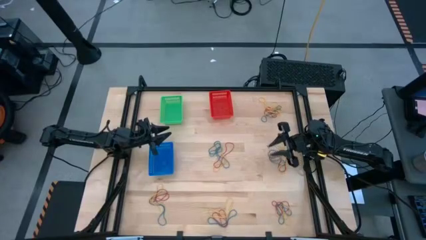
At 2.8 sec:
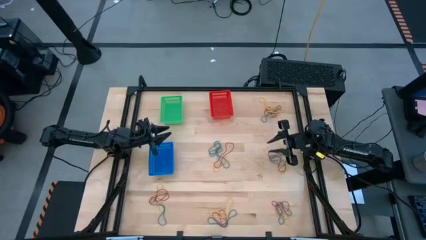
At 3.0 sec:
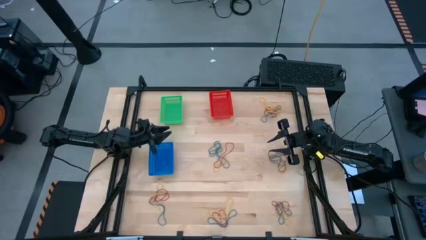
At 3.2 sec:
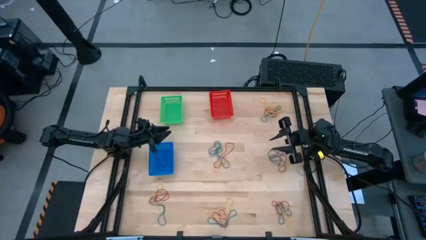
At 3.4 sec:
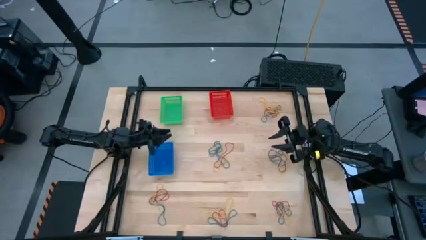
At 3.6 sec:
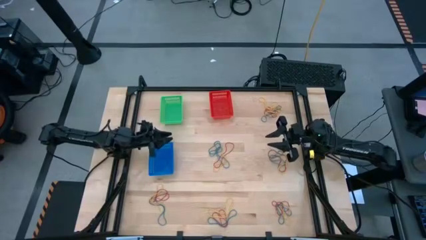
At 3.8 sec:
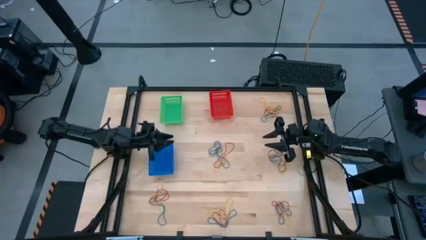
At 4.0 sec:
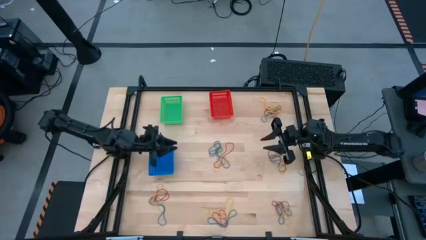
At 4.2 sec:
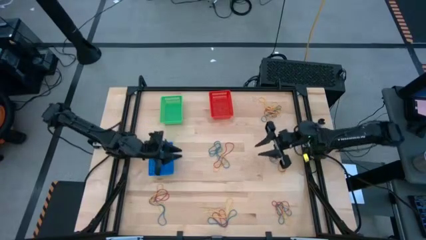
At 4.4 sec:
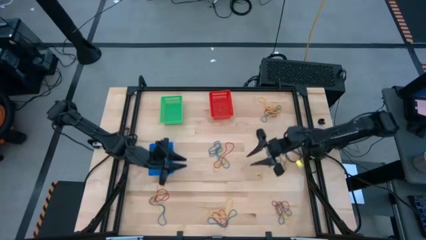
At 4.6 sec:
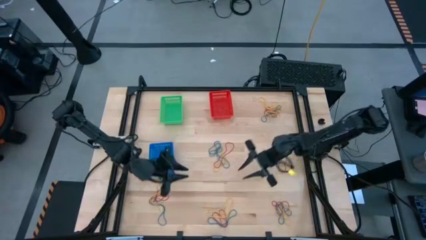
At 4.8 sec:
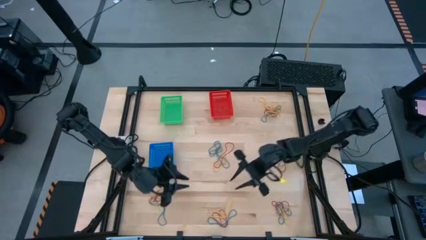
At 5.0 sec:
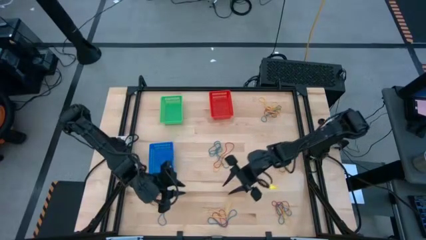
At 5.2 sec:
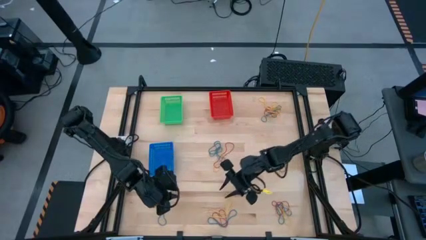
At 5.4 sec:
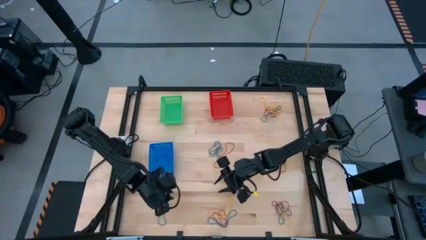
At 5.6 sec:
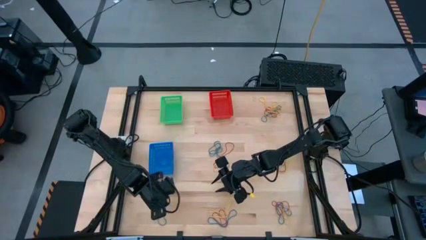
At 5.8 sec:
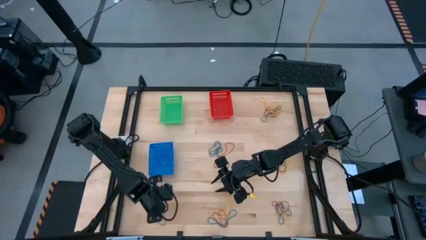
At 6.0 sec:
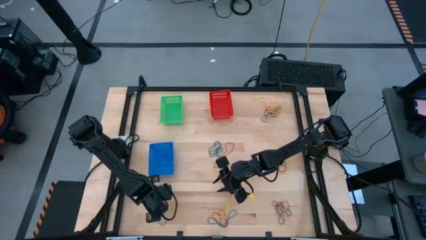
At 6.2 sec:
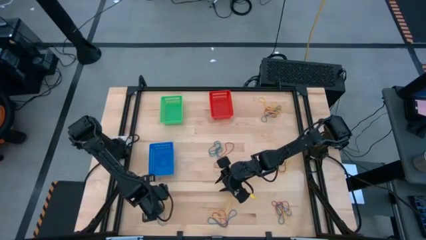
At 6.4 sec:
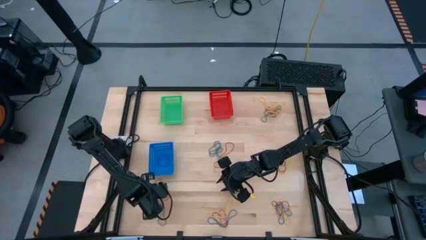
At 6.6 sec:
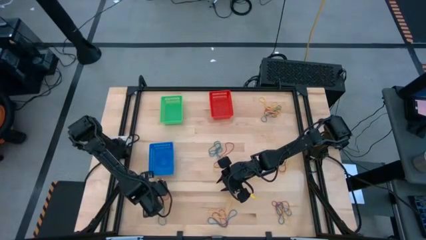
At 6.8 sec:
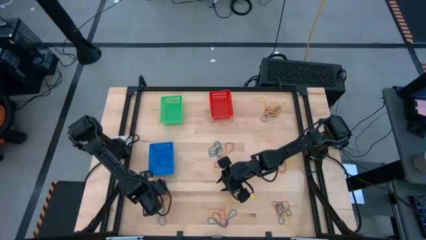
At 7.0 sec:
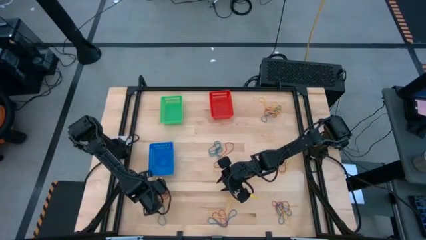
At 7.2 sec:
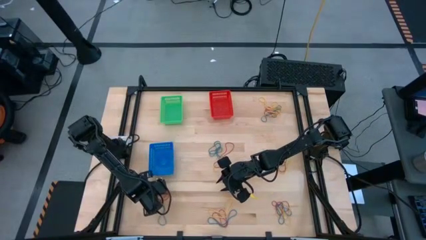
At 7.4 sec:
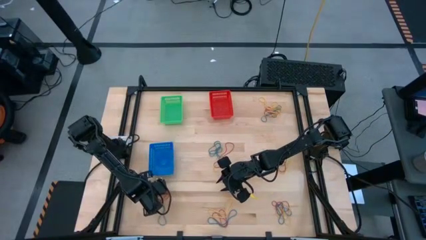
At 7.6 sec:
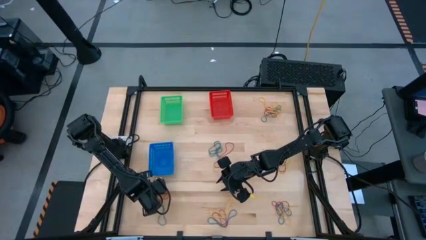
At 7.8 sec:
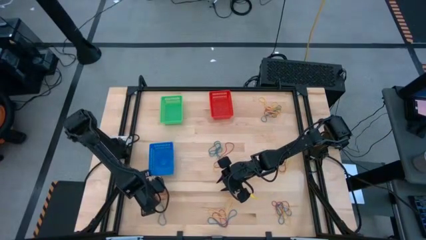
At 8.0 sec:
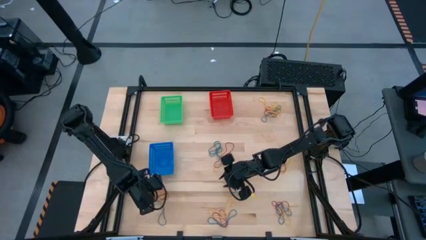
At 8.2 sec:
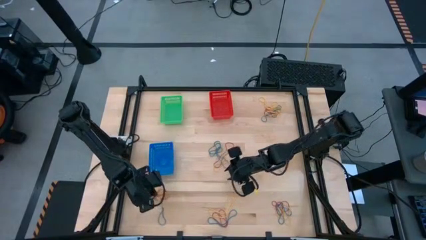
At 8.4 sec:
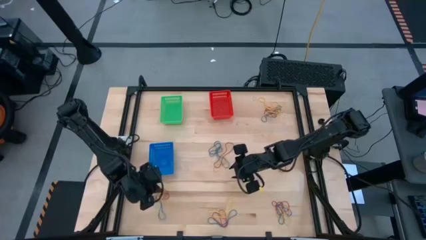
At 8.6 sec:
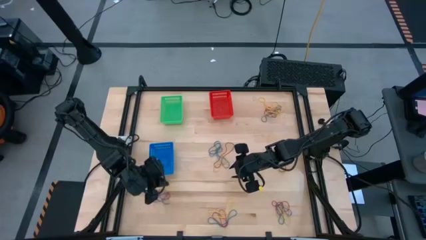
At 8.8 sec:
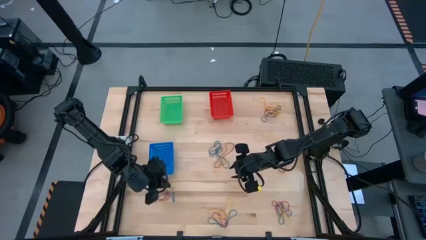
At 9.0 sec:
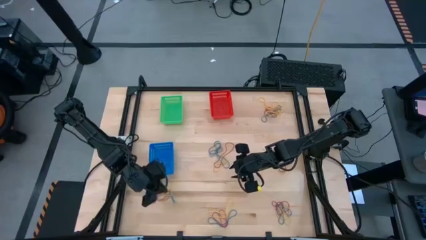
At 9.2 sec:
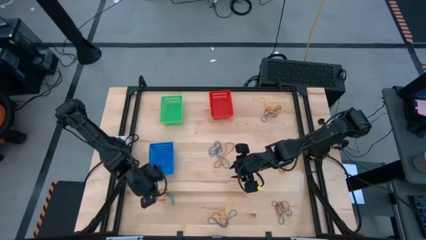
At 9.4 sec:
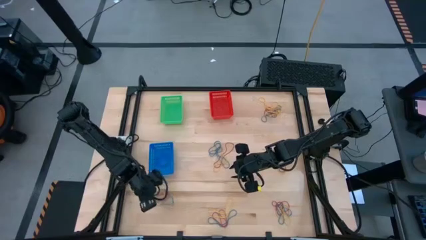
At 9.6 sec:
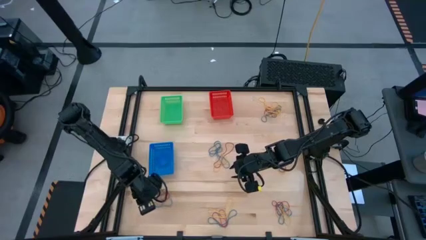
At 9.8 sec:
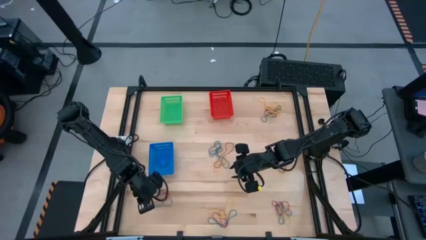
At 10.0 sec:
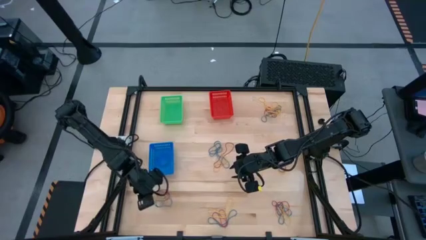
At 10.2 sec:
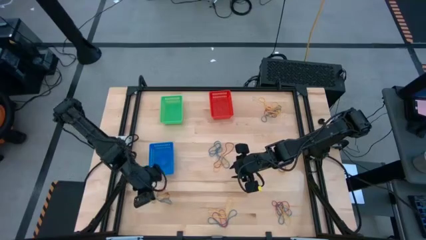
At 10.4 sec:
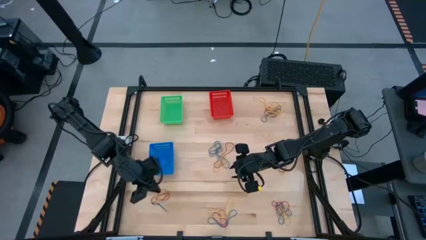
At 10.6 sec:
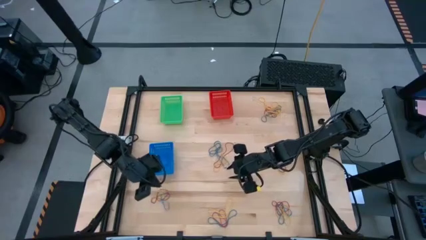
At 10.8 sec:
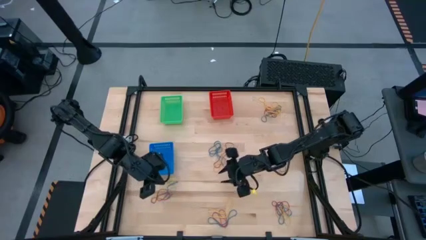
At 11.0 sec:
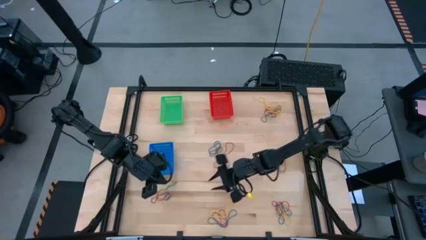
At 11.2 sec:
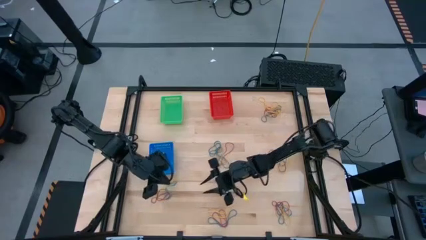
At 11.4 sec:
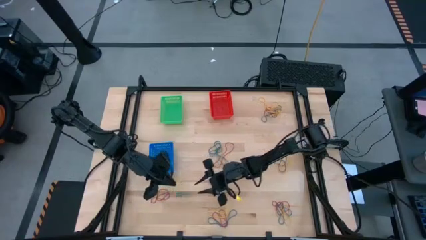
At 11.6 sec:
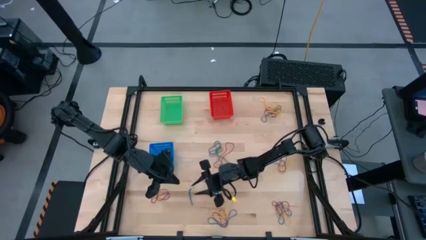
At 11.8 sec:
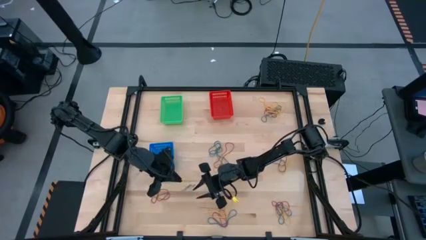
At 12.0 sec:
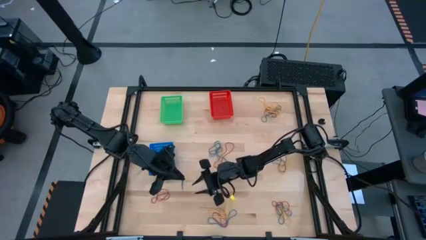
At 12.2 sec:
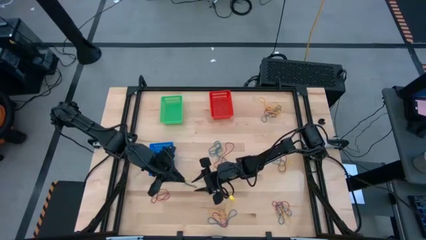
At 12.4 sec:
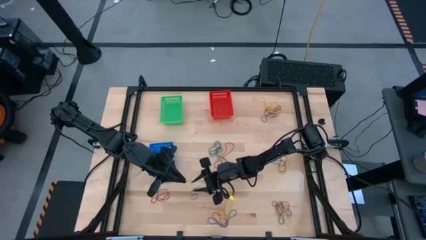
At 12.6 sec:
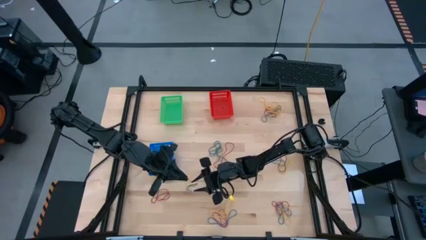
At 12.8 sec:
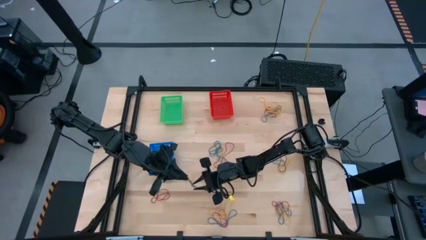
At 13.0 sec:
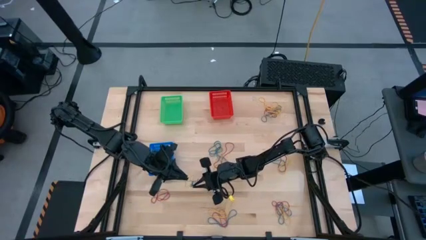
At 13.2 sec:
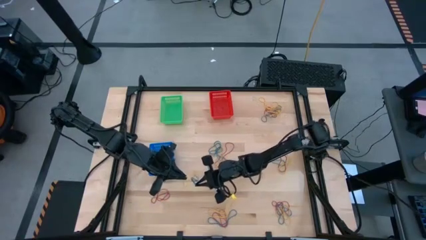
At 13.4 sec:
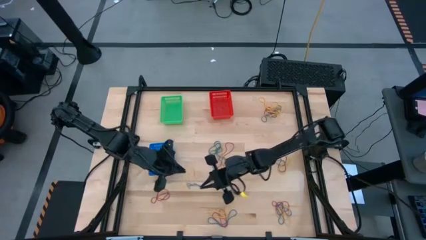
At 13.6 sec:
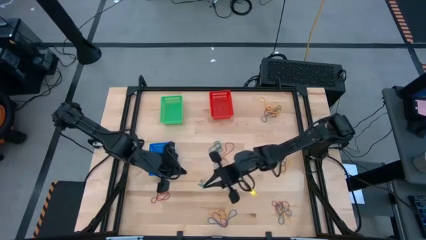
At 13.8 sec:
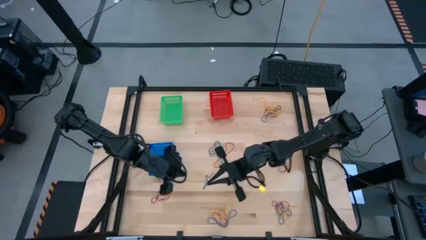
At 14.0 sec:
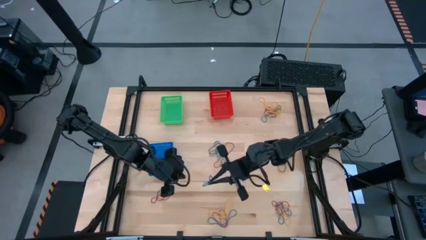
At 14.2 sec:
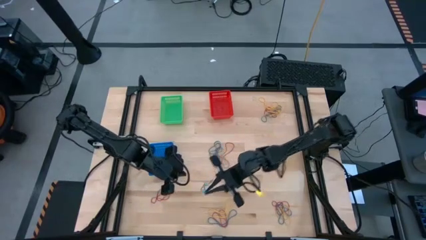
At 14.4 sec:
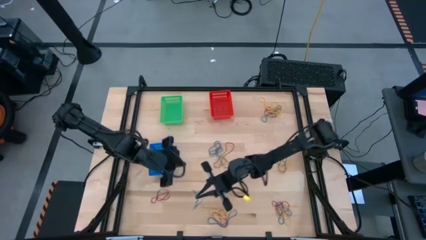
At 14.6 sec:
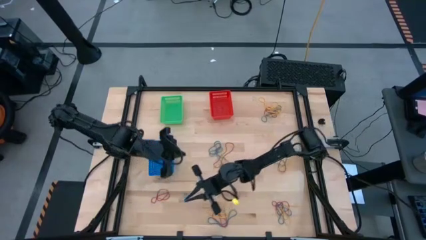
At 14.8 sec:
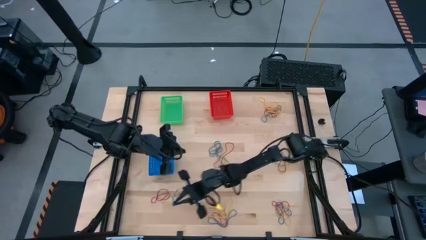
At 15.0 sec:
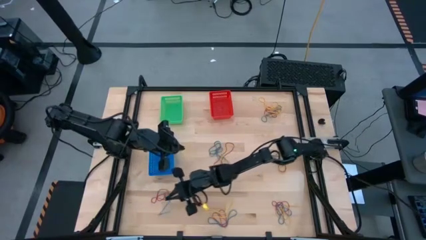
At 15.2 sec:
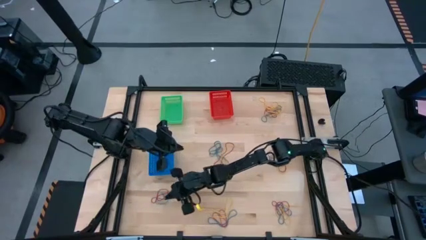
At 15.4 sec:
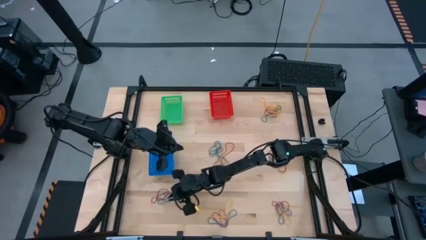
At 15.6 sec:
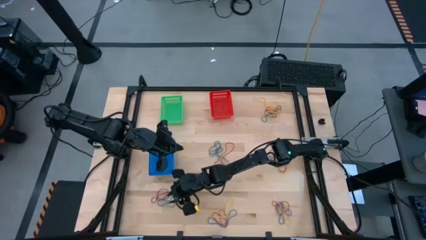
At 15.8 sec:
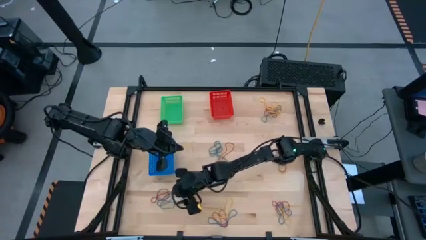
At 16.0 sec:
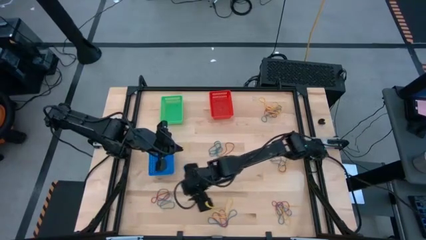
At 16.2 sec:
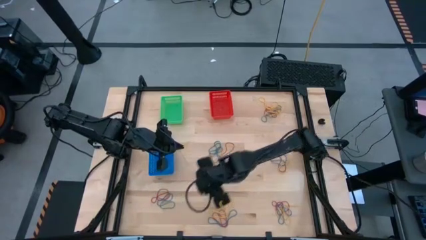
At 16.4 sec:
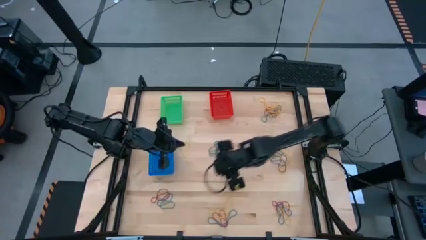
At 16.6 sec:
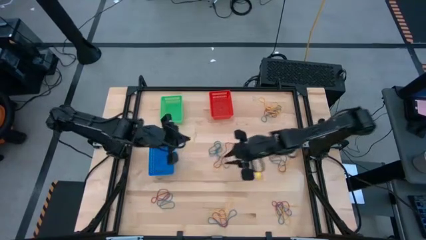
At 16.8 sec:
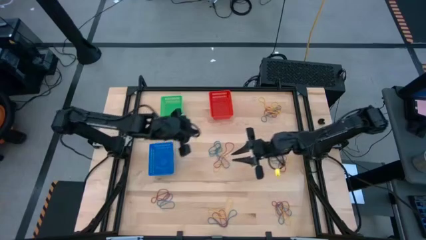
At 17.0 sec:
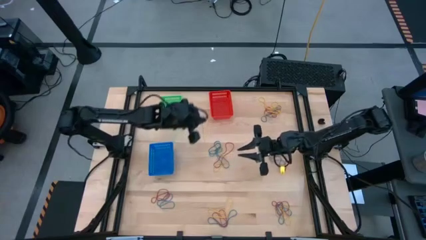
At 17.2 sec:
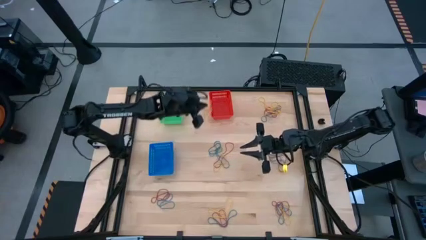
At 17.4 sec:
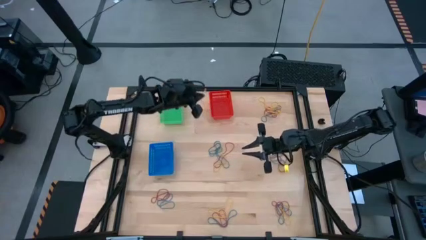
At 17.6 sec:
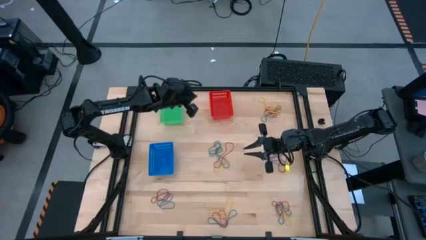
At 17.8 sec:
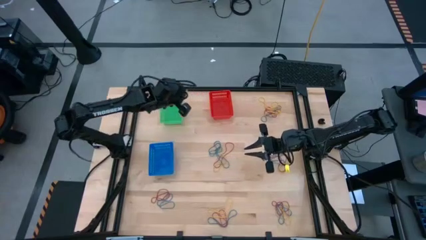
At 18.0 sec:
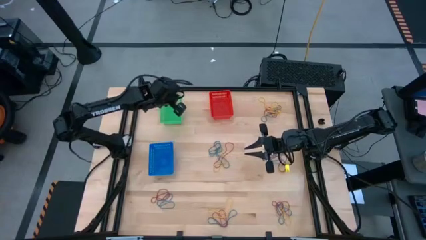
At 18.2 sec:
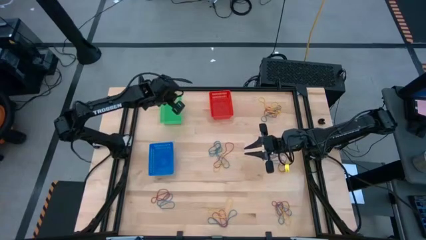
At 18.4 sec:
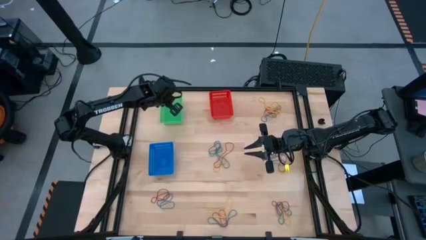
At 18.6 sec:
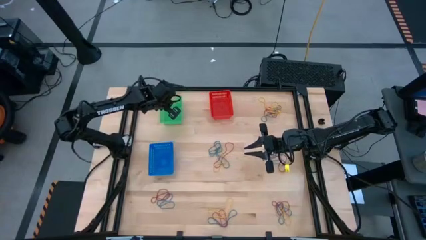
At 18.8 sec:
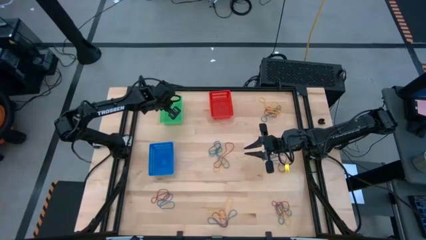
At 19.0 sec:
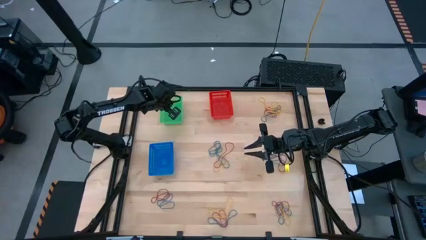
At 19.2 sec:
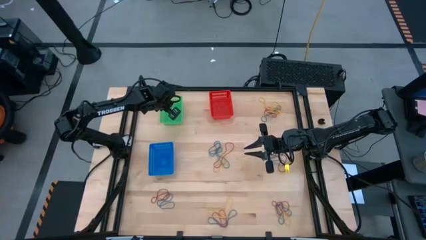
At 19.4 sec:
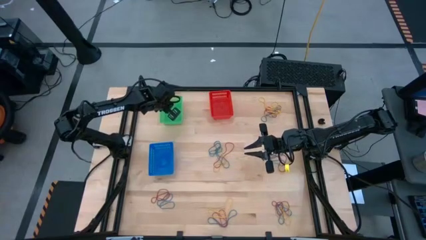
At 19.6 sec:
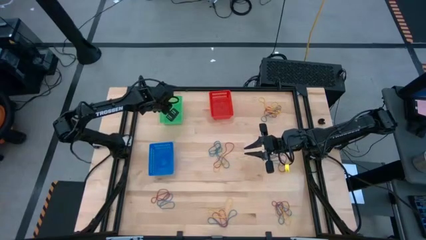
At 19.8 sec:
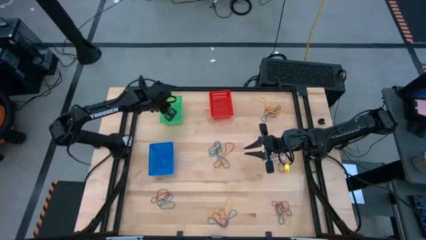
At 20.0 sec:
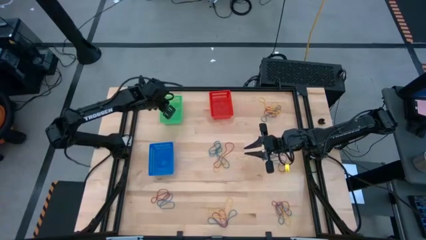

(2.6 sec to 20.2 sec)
Task: Sort rubber bands into baskets
Put the yellow rubber band into the green bin
